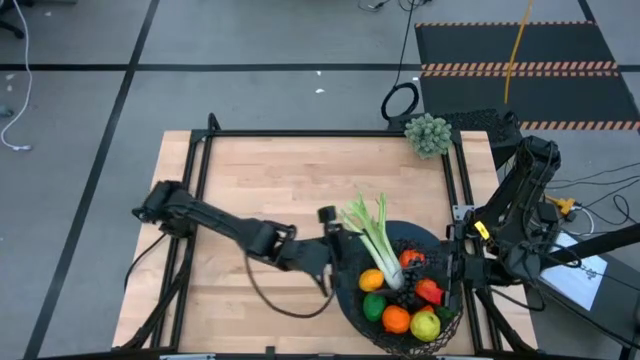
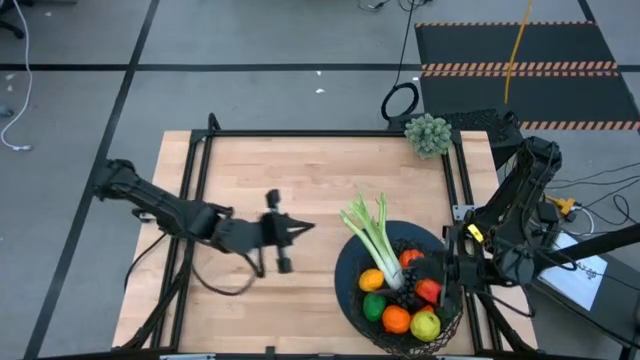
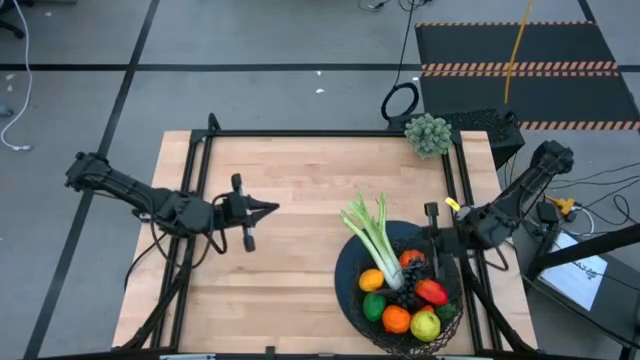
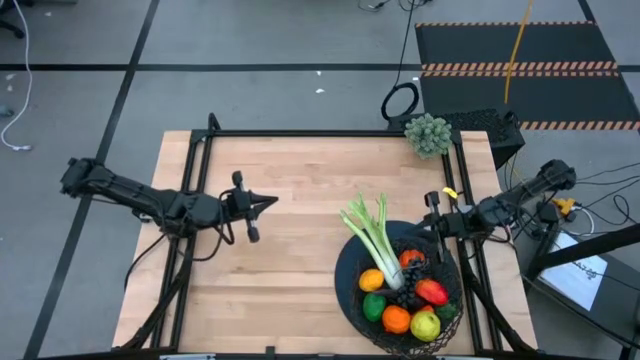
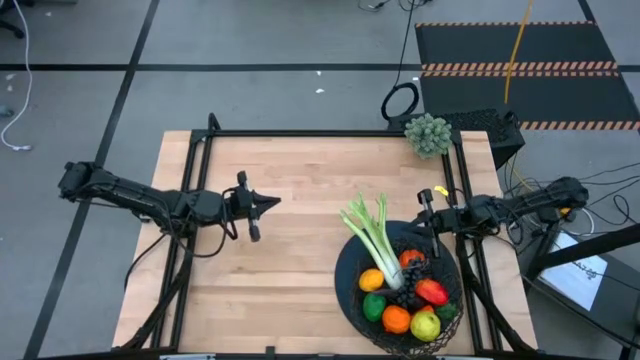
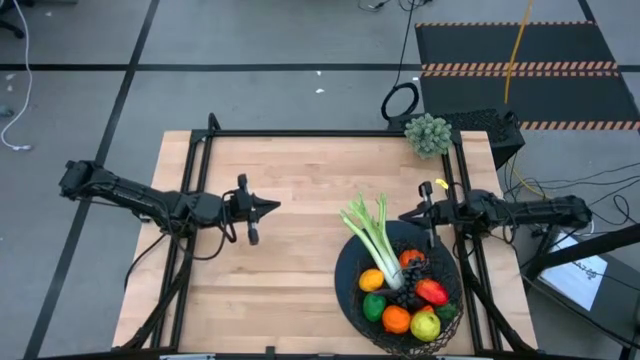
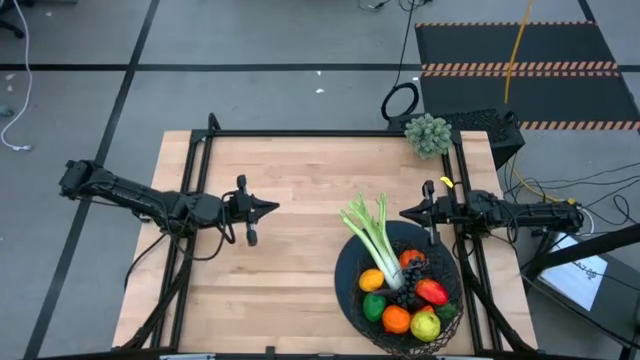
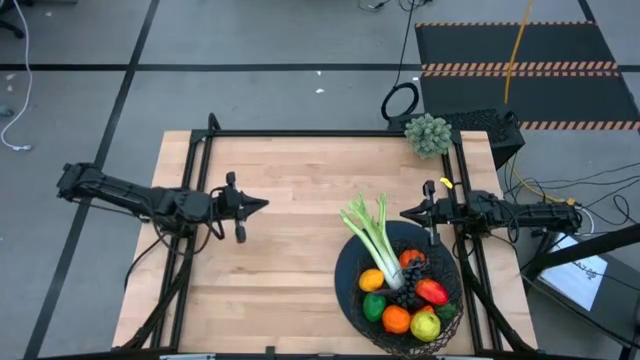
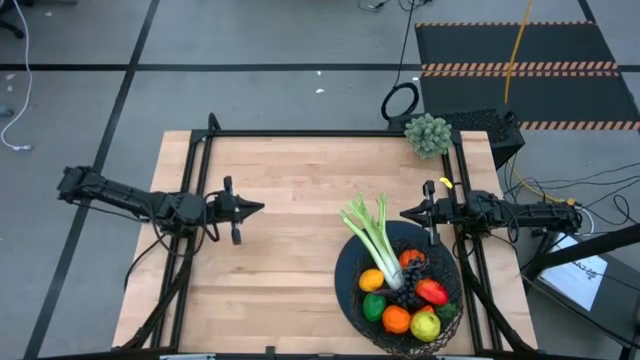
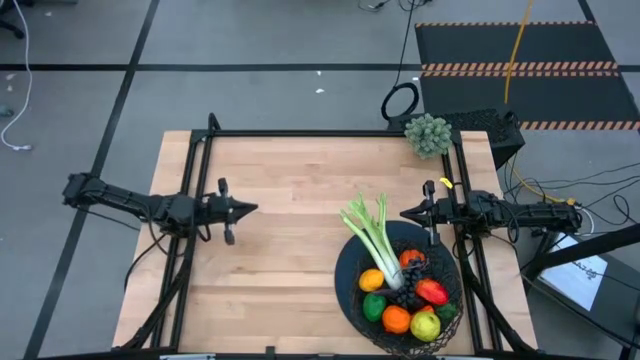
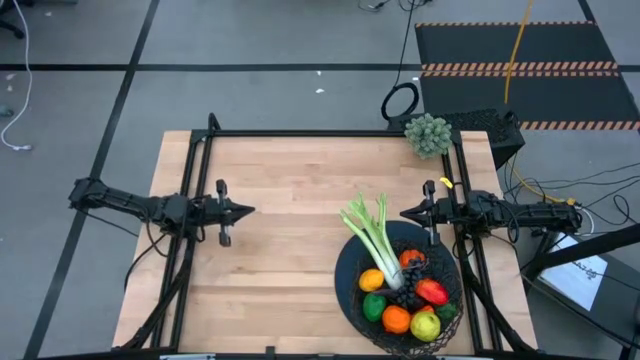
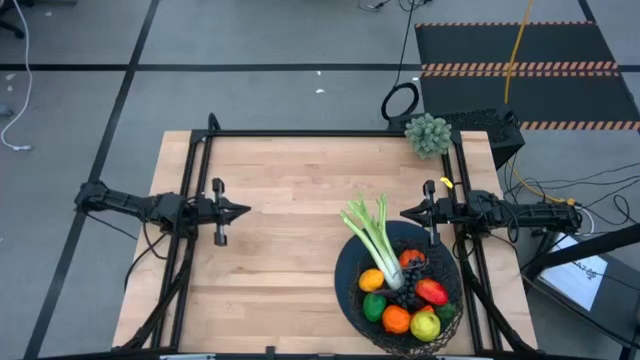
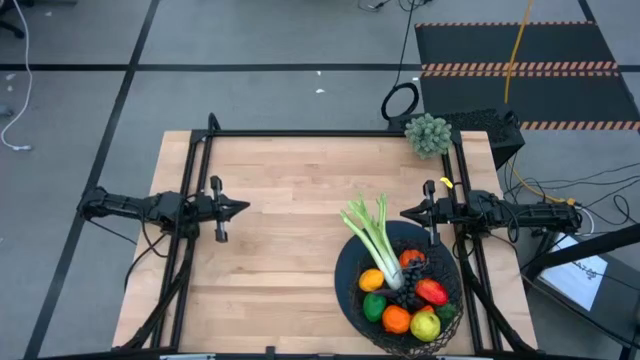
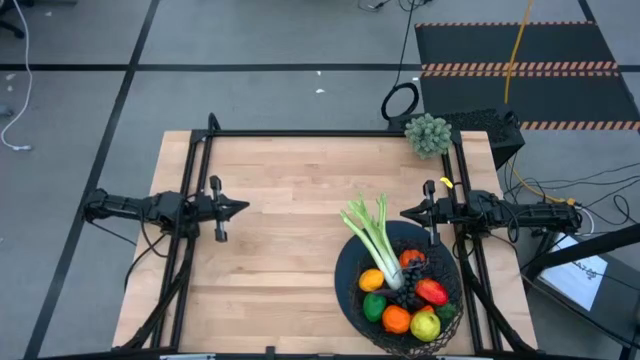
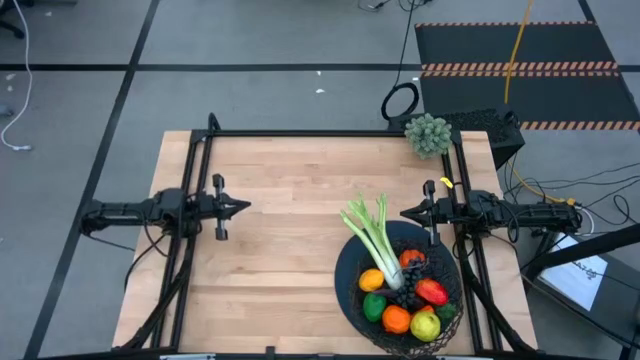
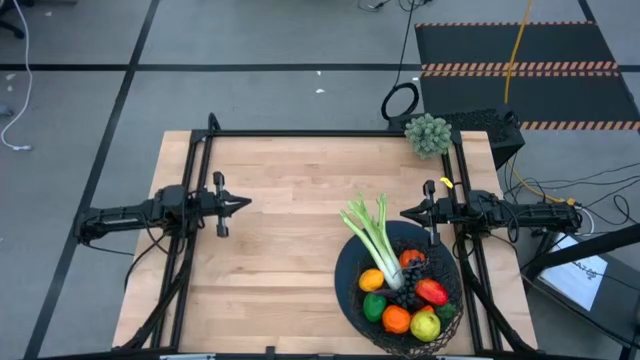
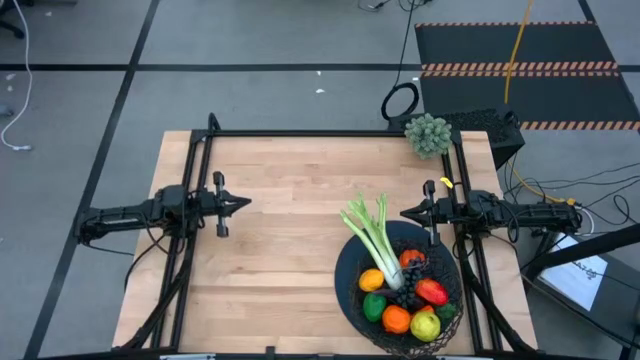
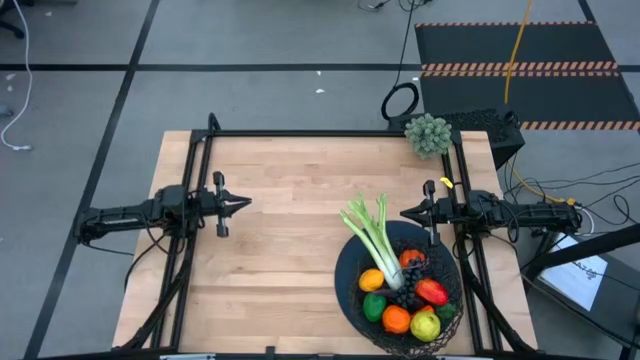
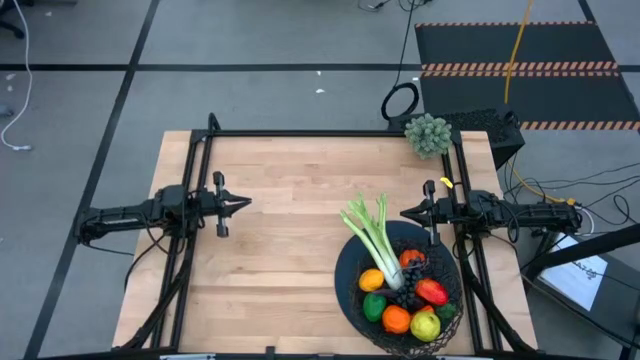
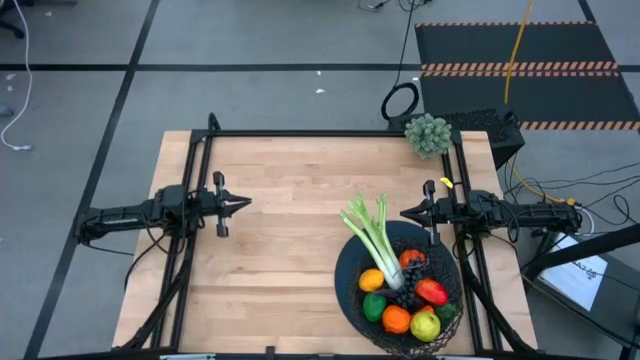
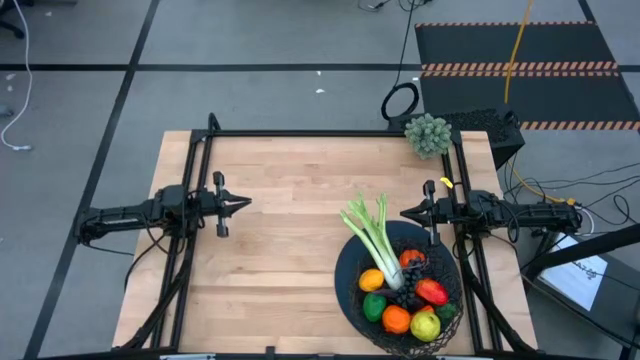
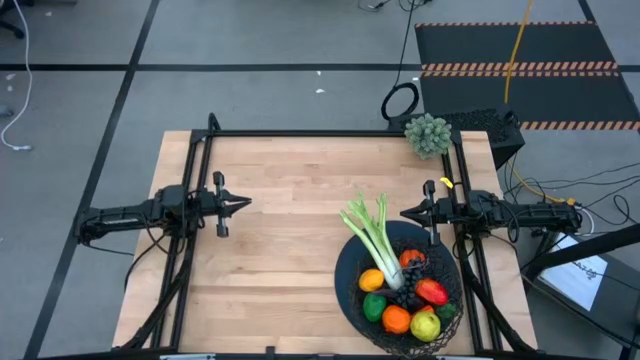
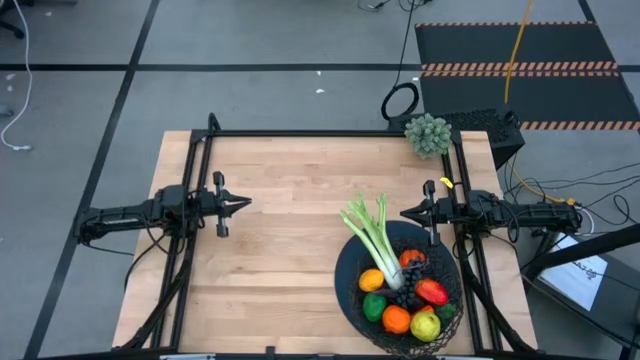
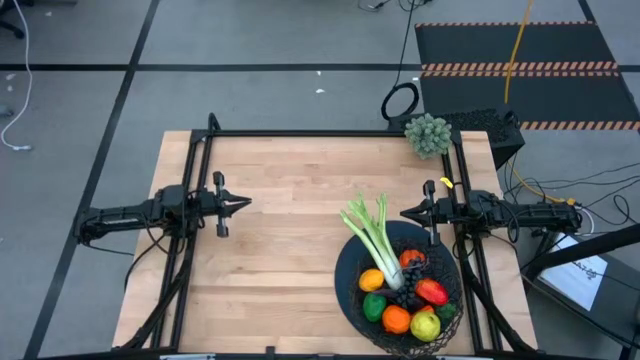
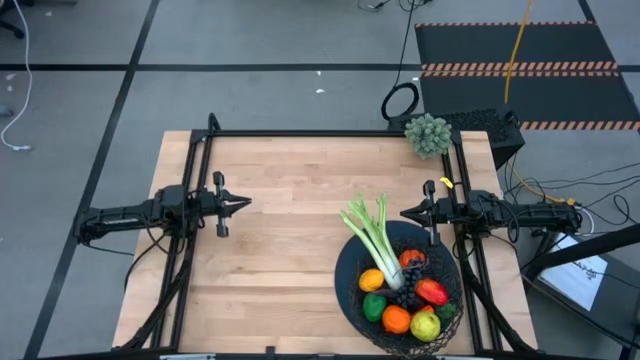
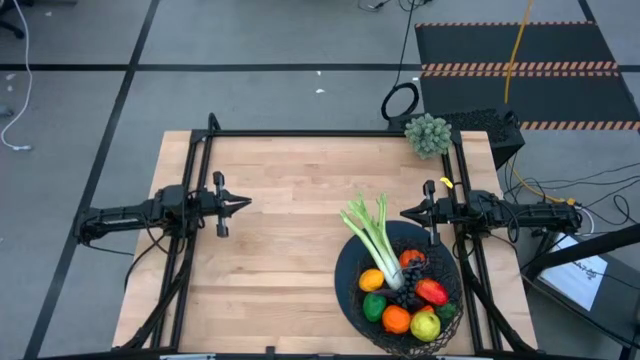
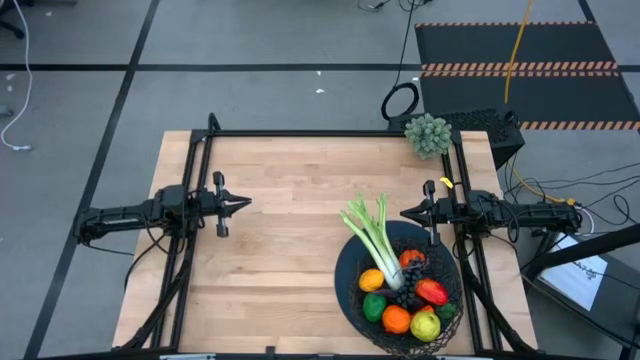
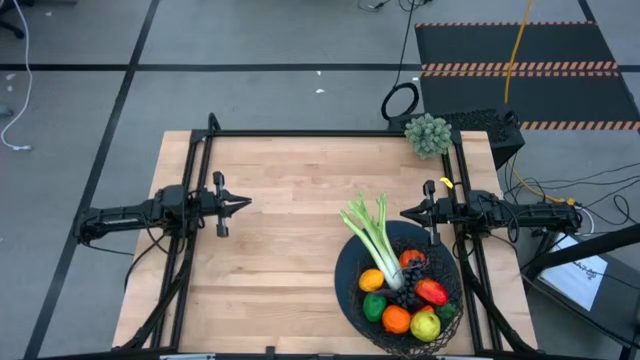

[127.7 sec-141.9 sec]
Task: Build produce basket
Return to Home Position

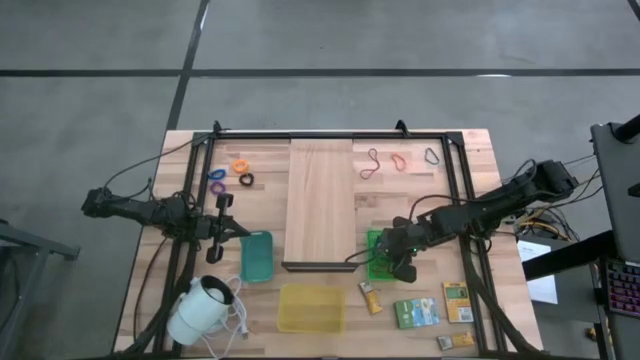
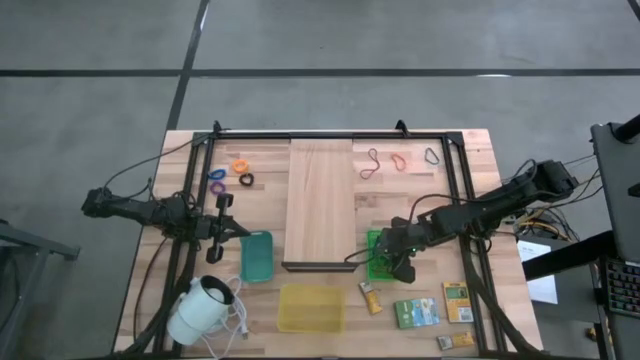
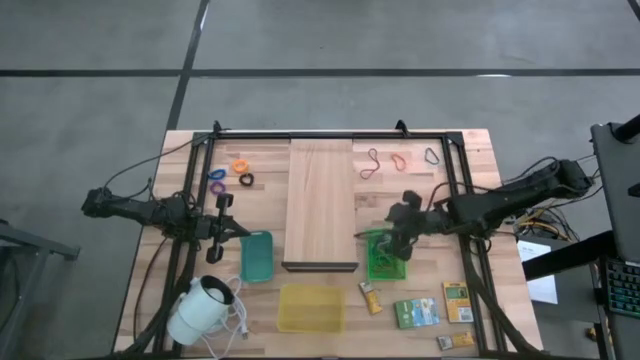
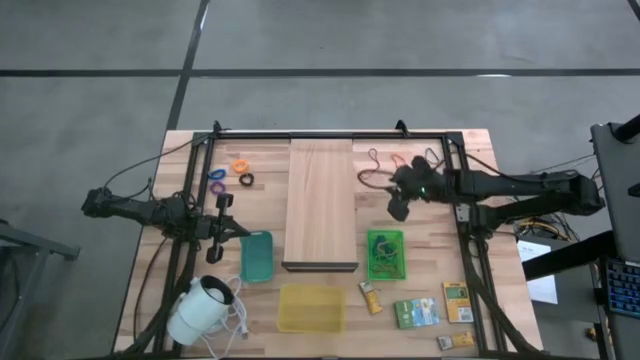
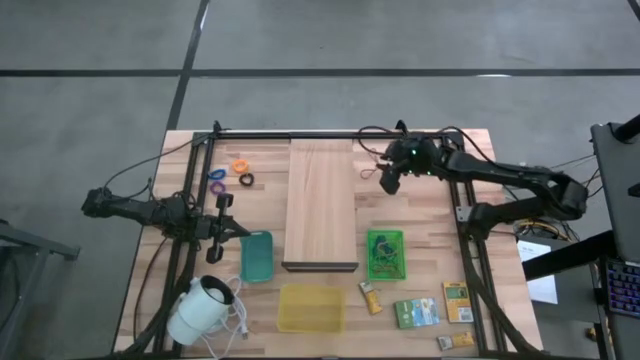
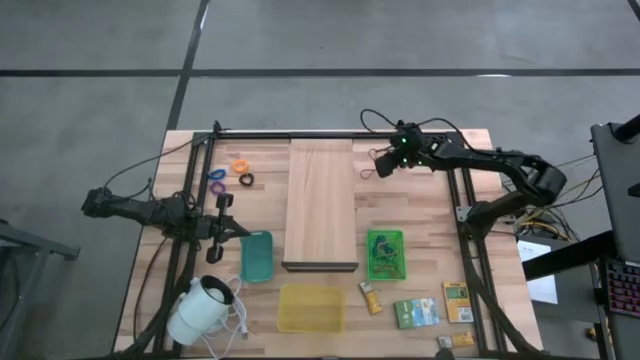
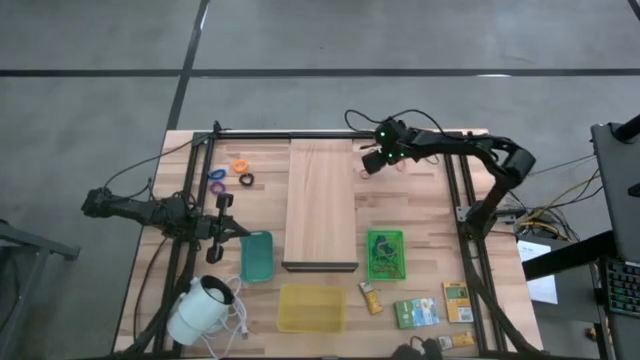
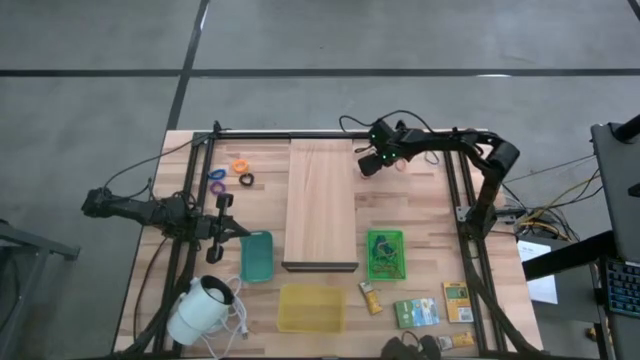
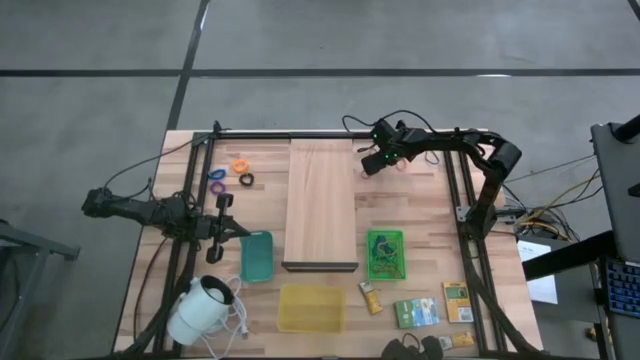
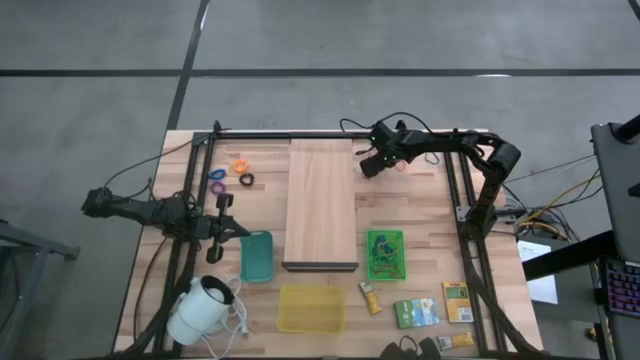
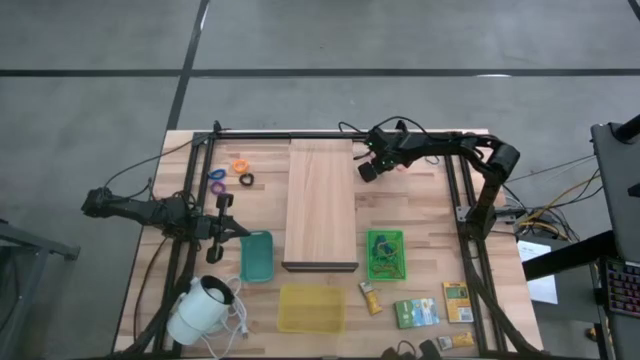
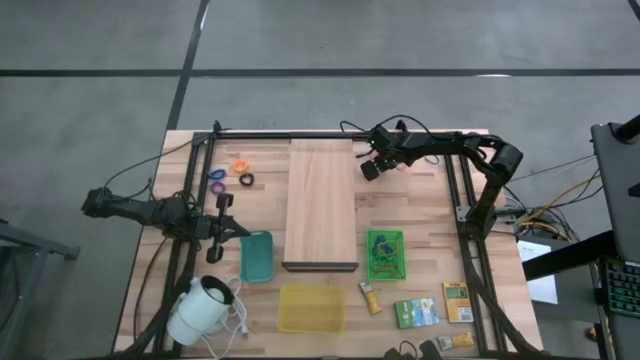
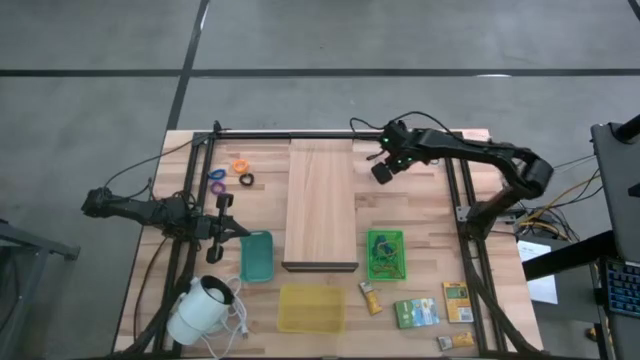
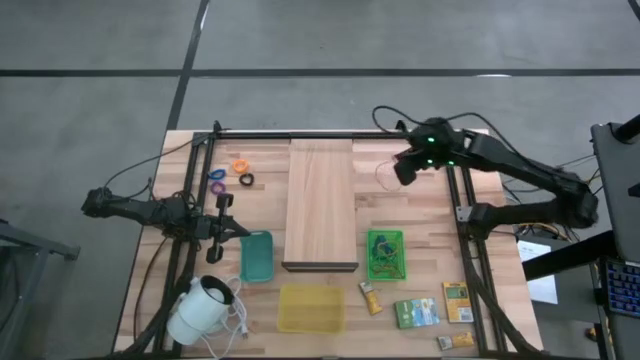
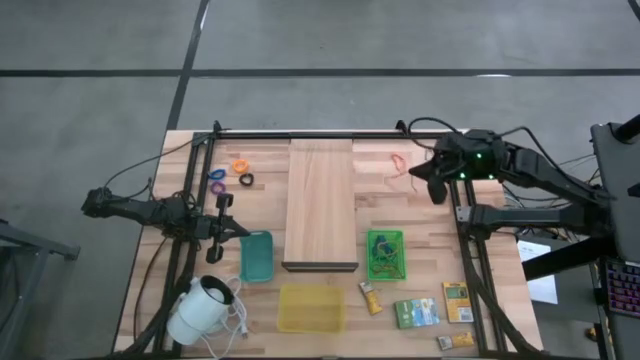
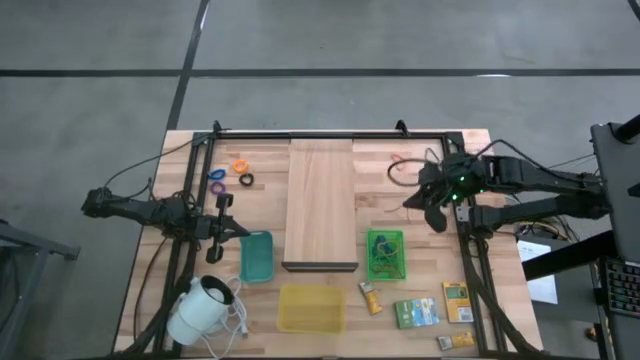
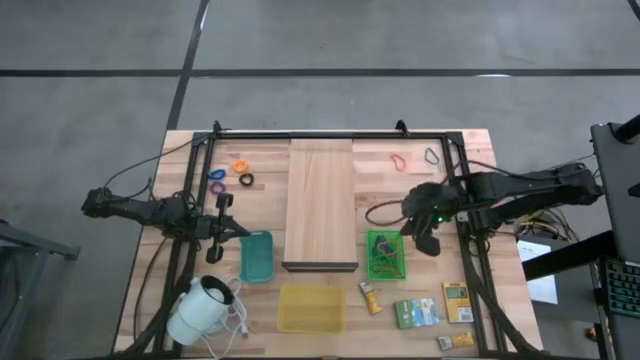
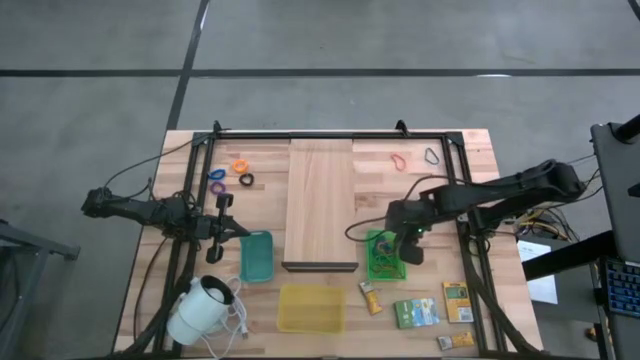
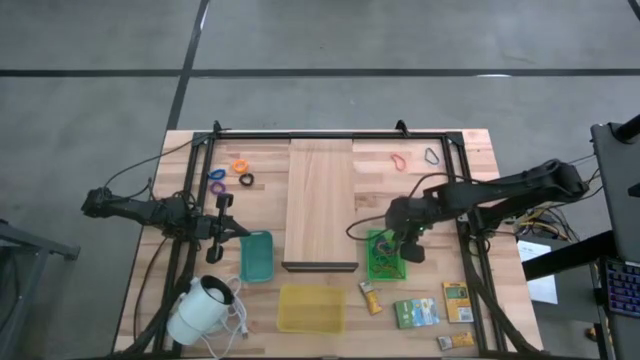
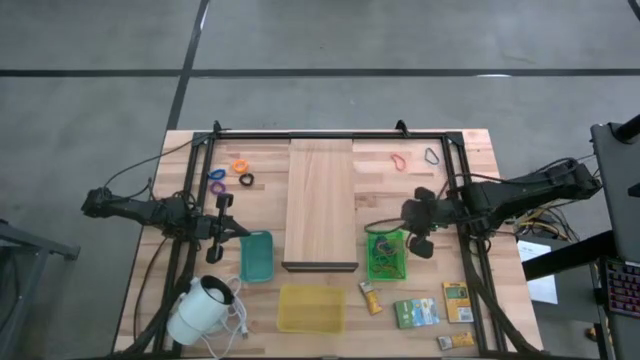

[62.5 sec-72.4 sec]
Task: Pick & Place Office Desk Supplies
Put the red rubber band into the green bin
